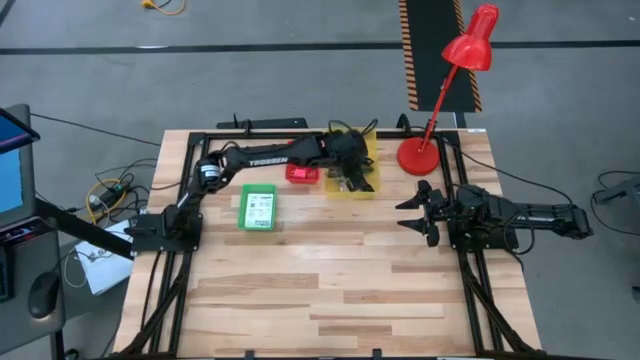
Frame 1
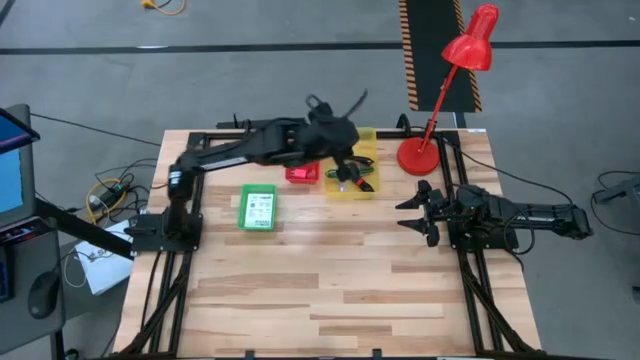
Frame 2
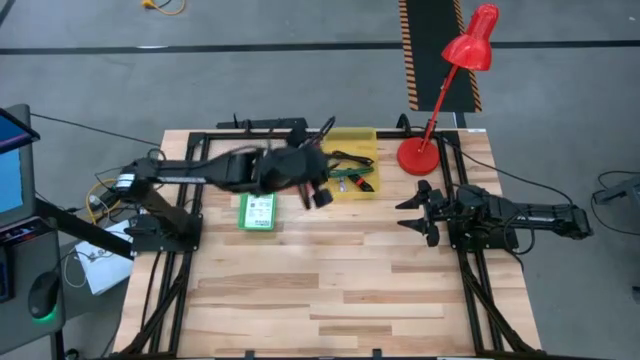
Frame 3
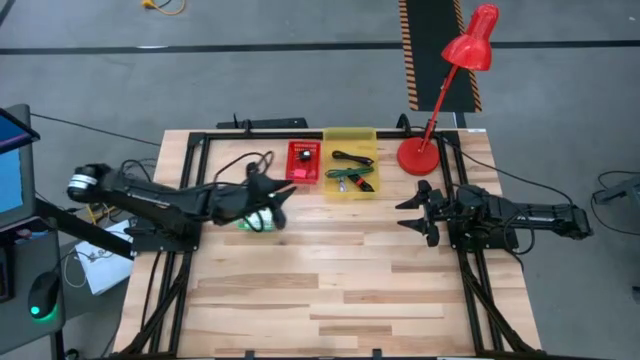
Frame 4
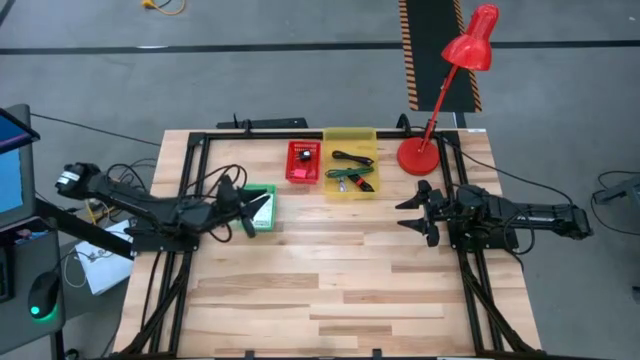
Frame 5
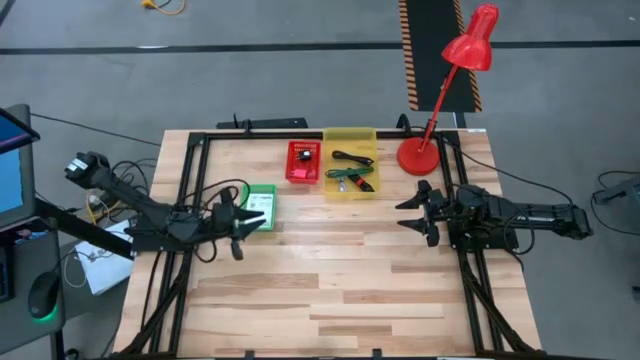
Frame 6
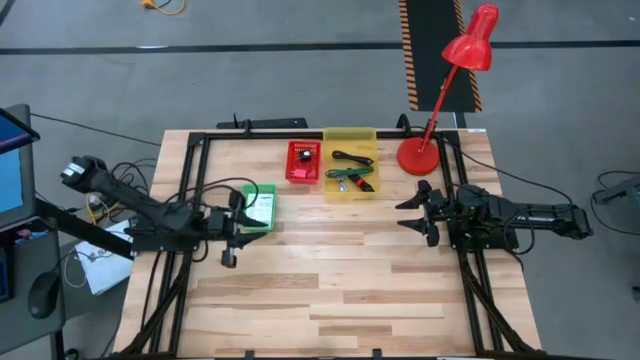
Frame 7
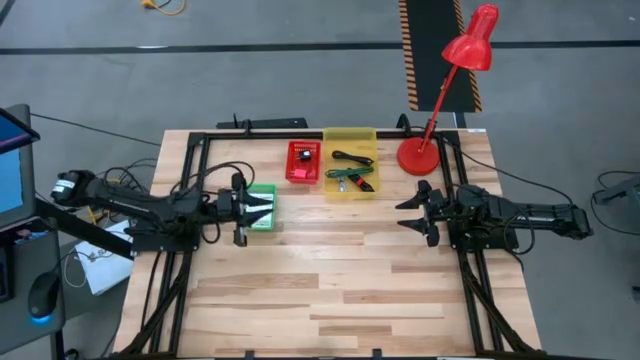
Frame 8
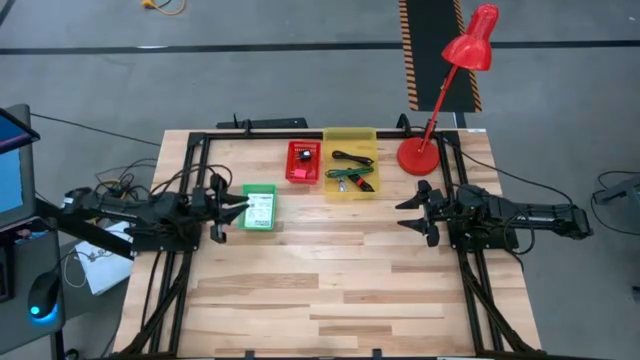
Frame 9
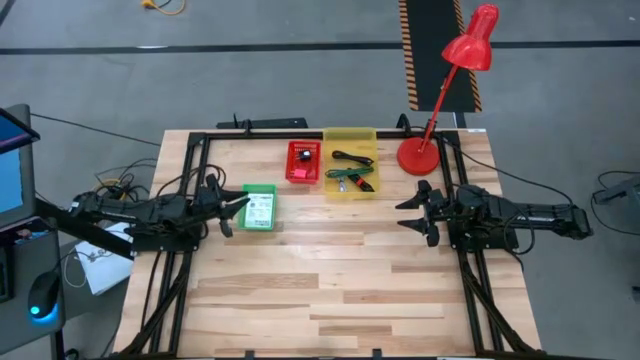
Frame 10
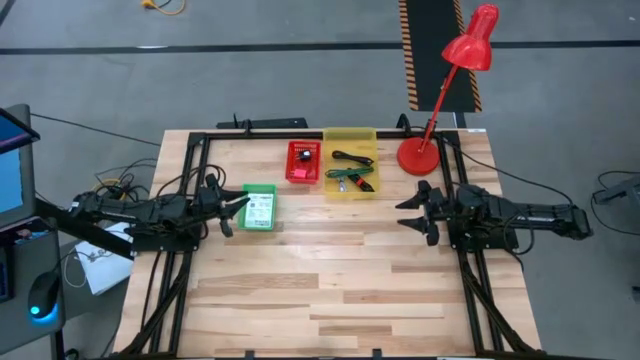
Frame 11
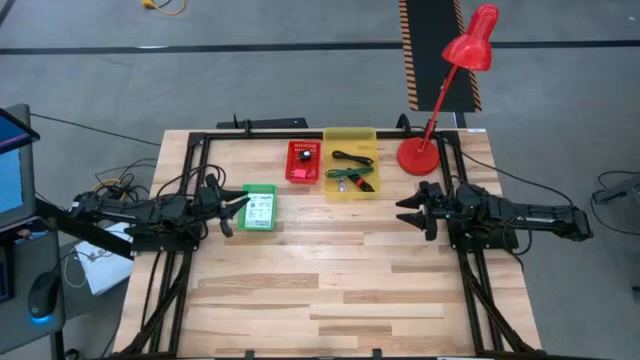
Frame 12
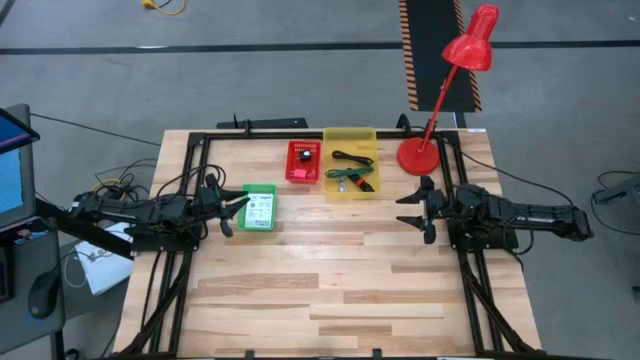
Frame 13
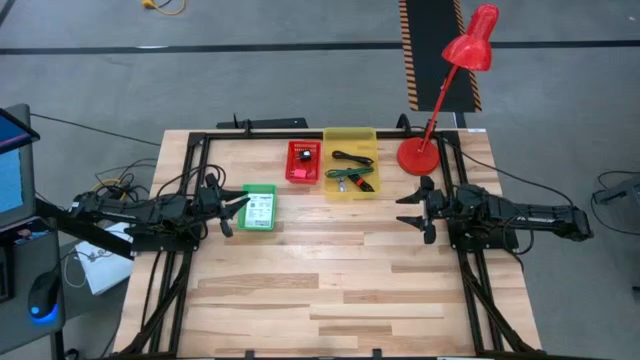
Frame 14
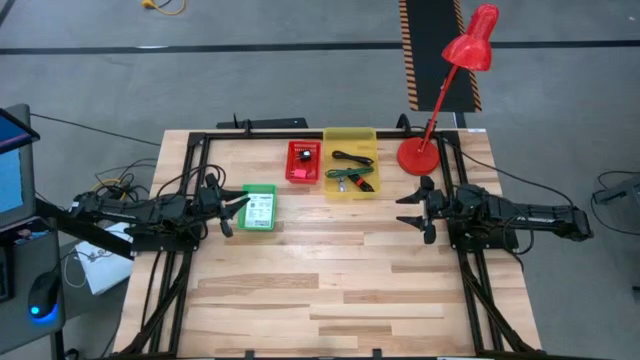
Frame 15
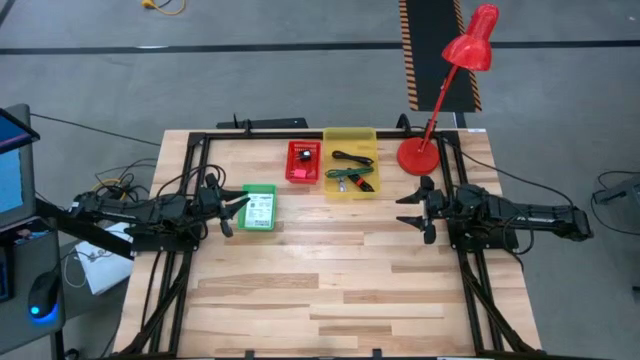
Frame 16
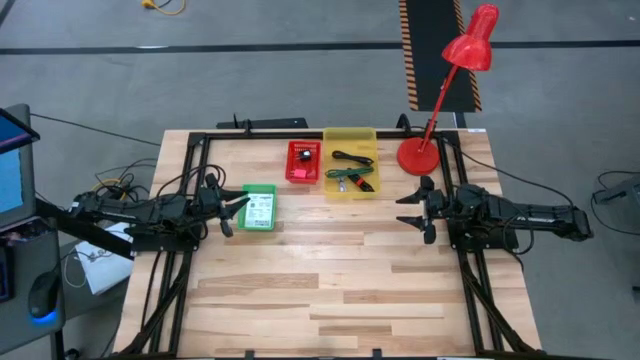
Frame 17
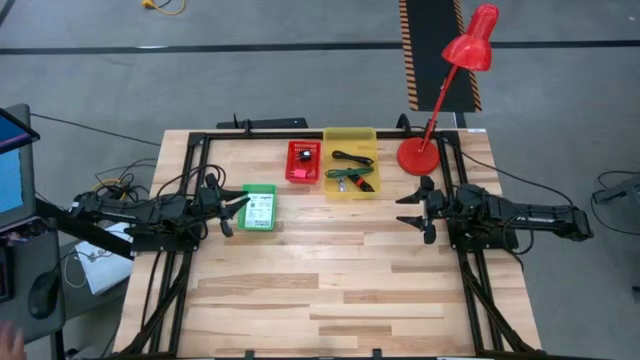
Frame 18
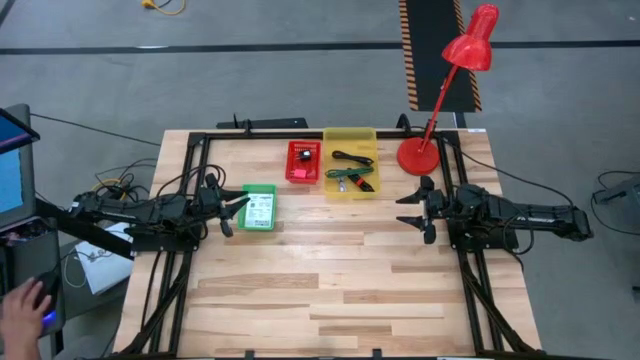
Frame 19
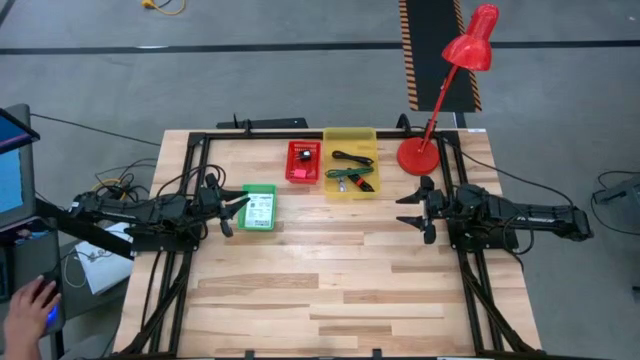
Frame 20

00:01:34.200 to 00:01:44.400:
Task: Pick and place items into bin
Return to Home Position

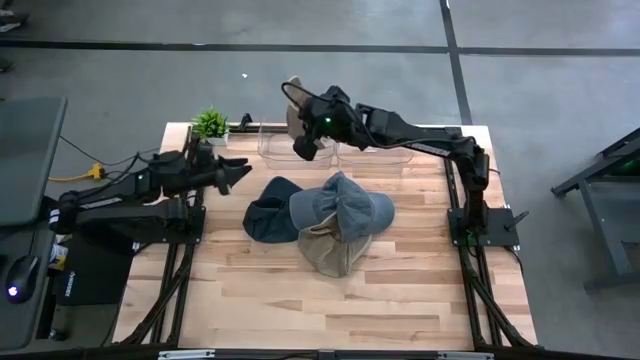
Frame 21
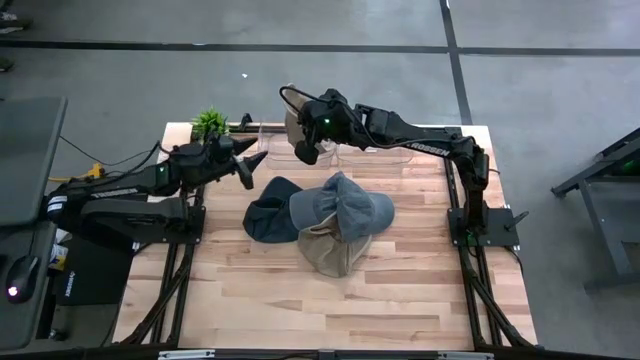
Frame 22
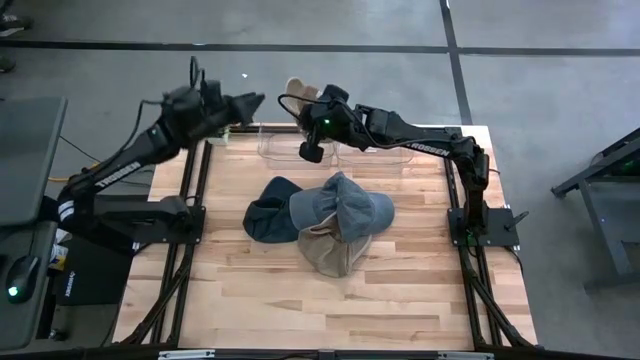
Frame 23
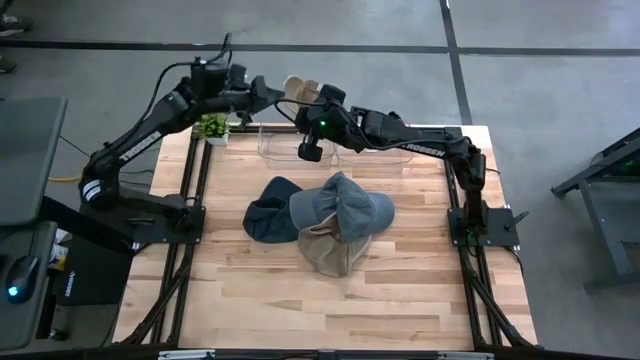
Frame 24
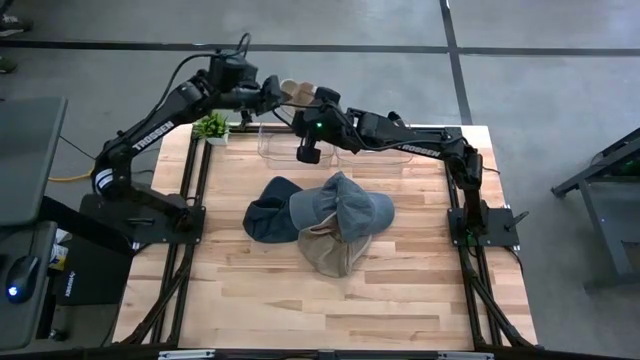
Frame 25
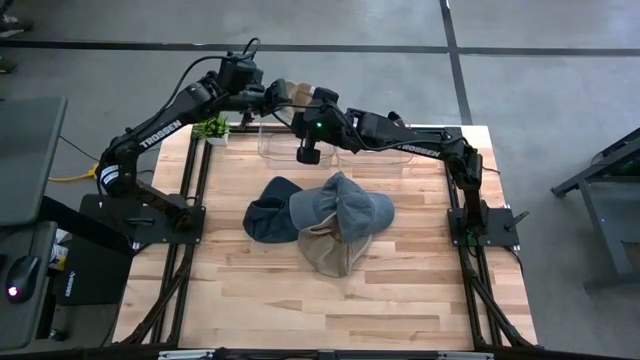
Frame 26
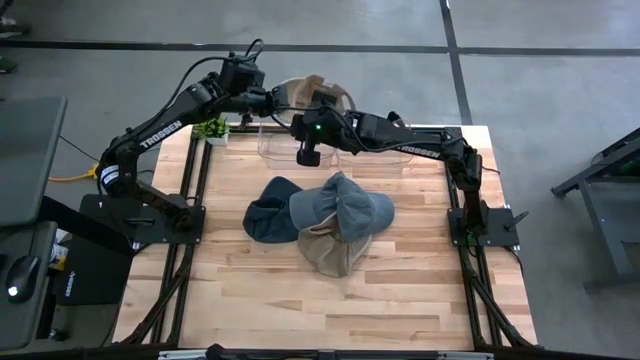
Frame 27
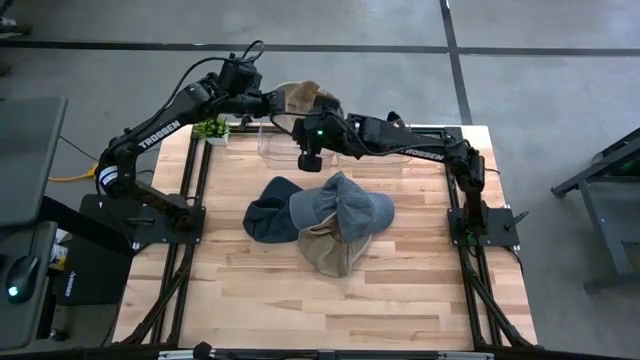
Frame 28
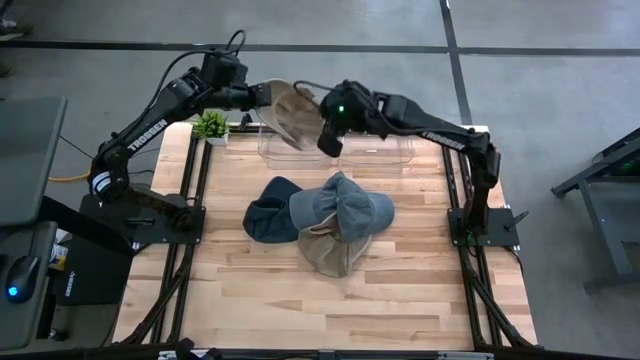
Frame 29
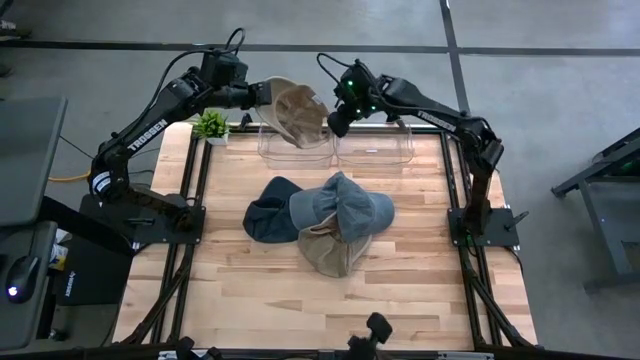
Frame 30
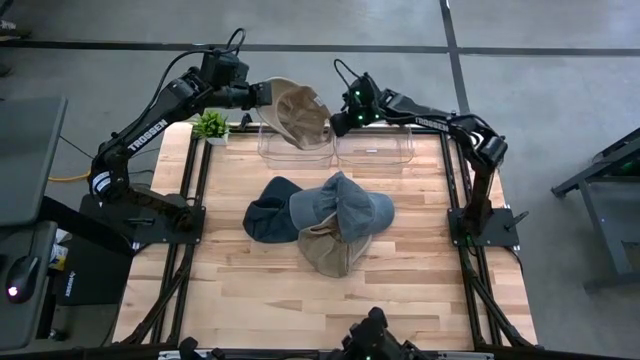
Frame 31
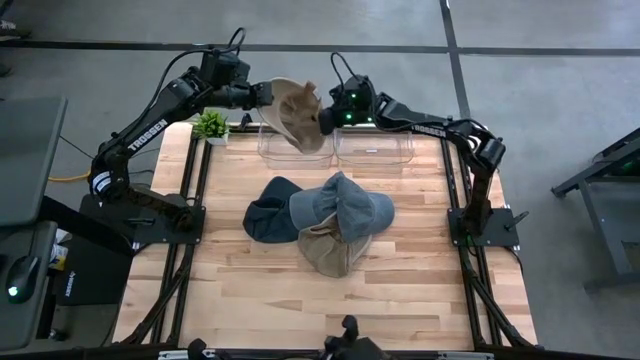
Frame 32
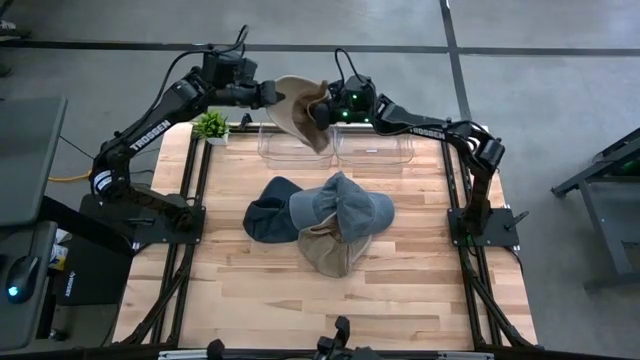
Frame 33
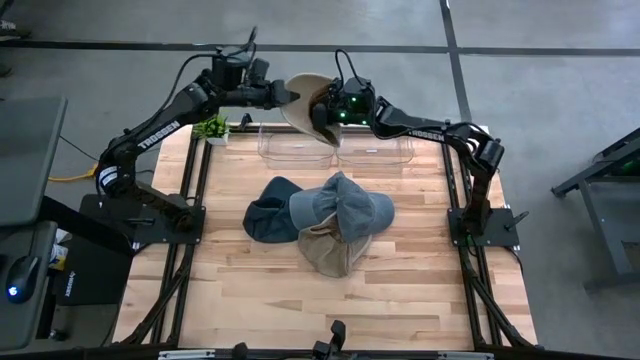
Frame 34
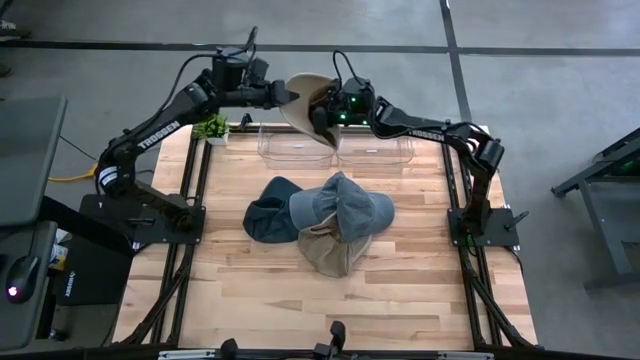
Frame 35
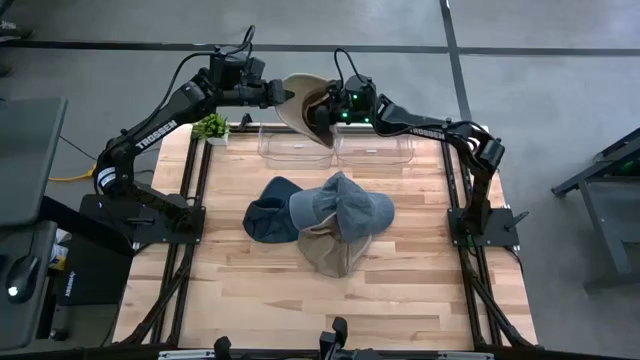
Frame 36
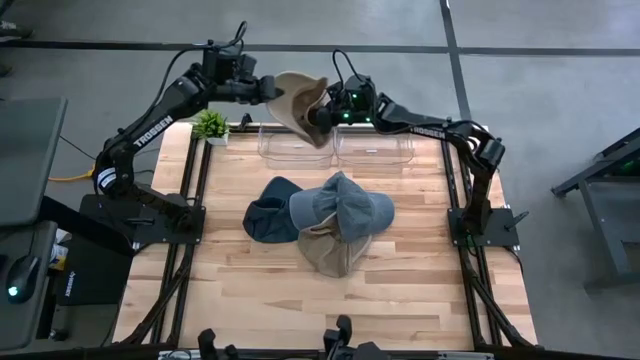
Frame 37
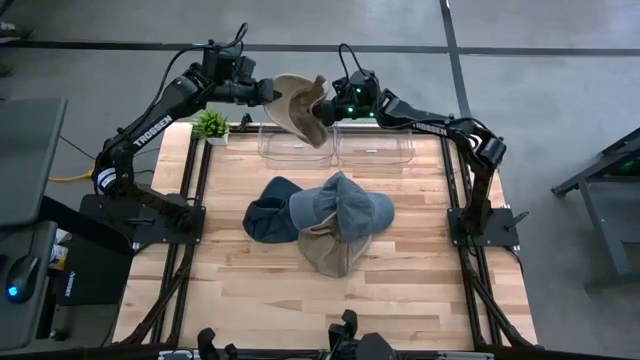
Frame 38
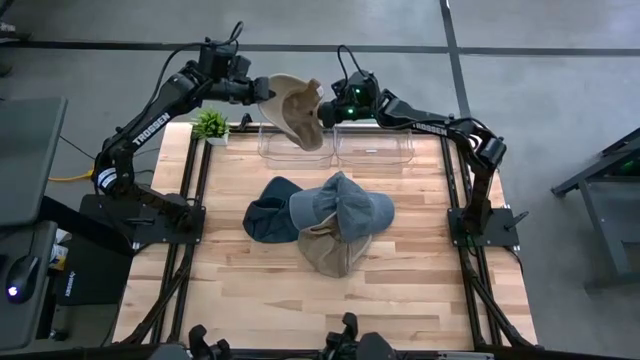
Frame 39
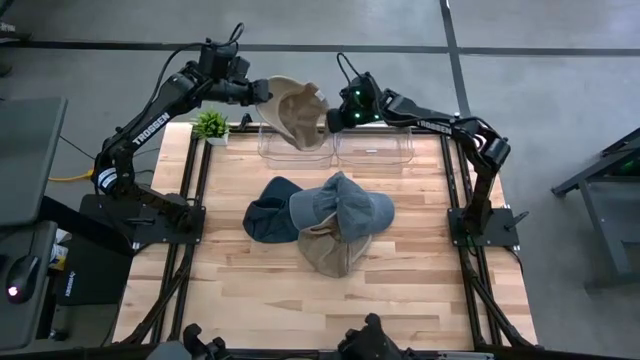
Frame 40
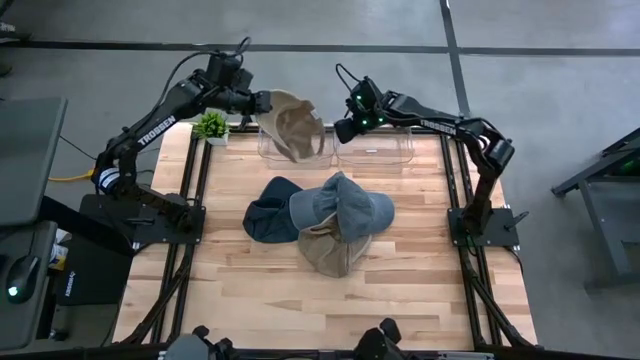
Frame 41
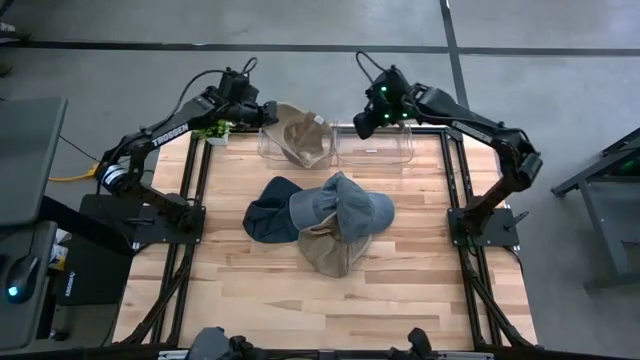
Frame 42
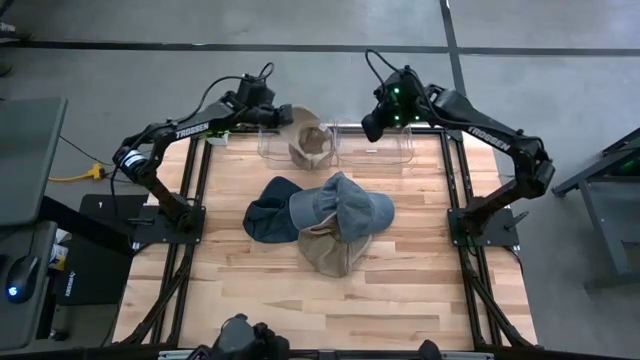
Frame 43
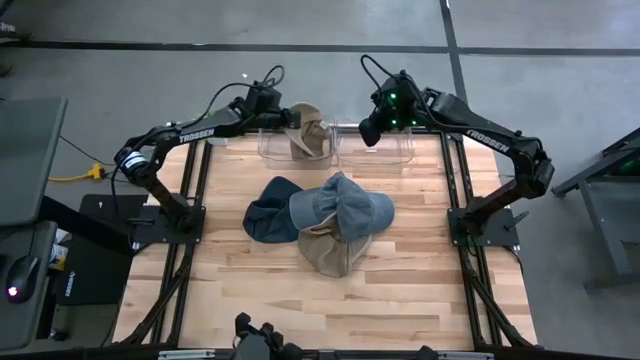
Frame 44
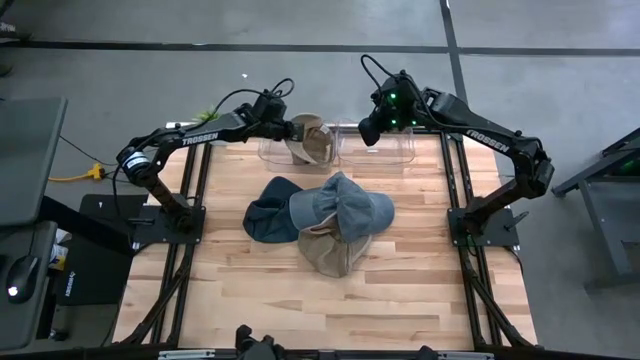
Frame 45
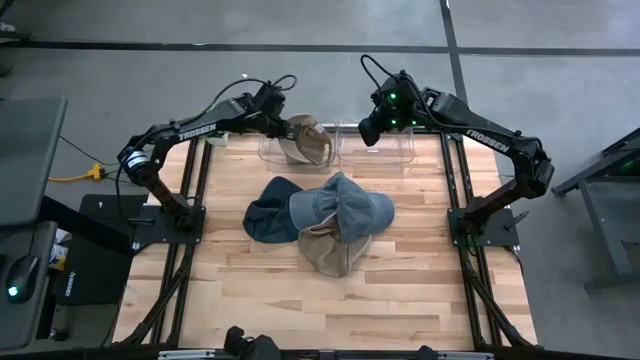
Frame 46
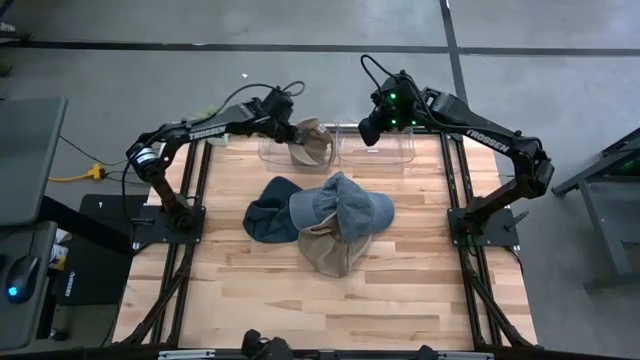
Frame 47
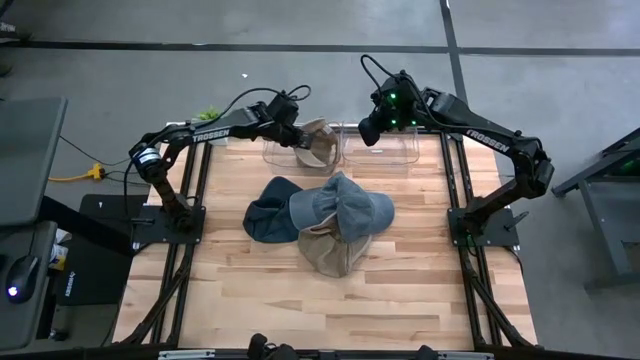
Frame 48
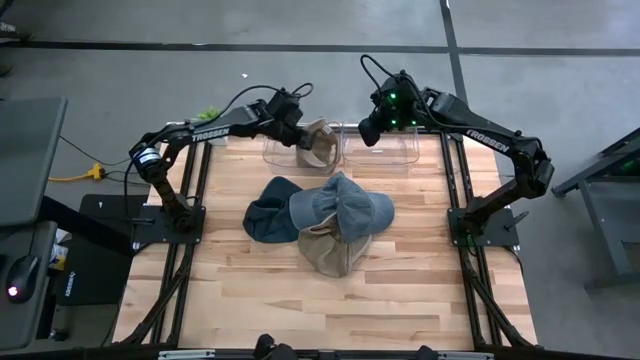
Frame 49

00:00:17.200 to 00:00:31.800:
Task: Pick & Place hat
Put the left brown cap into the left transparent bin
